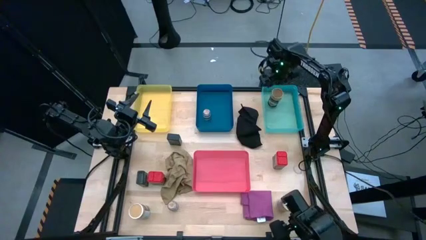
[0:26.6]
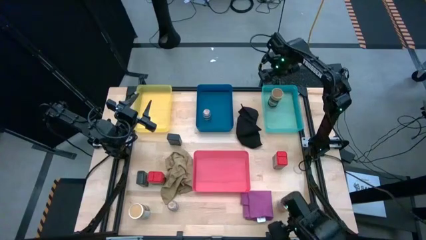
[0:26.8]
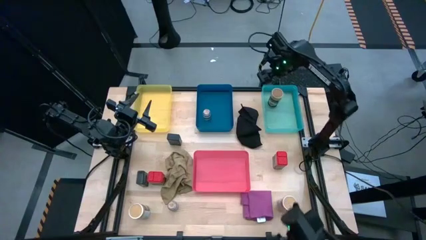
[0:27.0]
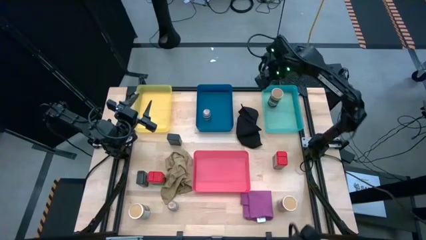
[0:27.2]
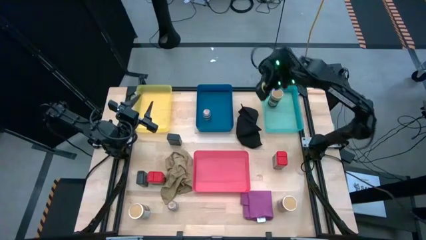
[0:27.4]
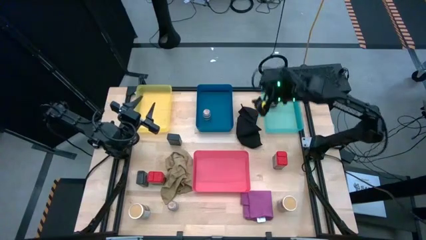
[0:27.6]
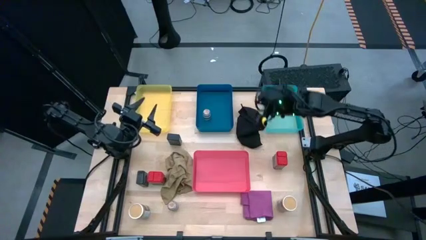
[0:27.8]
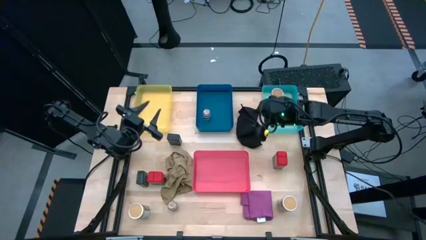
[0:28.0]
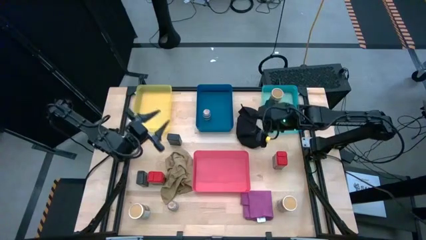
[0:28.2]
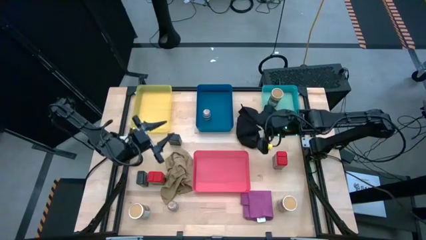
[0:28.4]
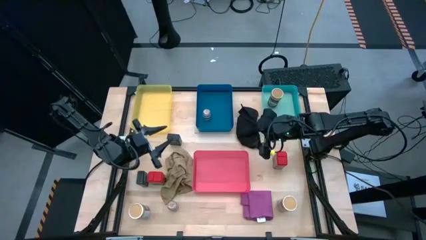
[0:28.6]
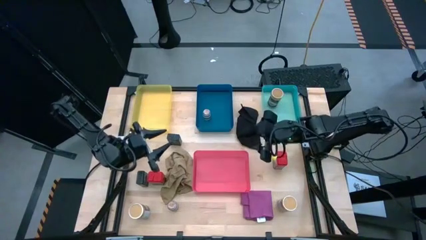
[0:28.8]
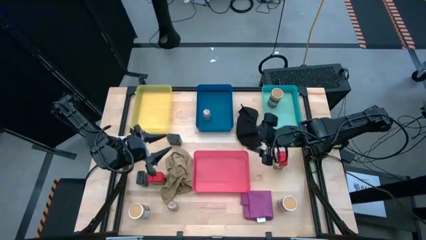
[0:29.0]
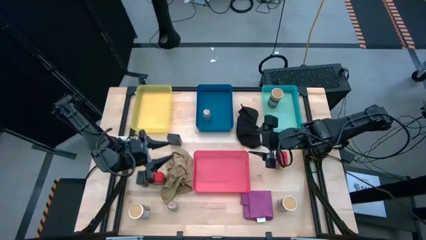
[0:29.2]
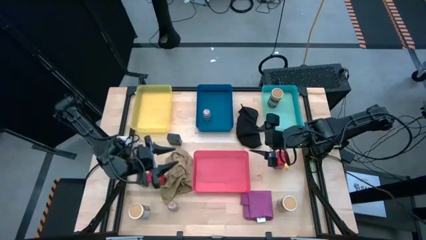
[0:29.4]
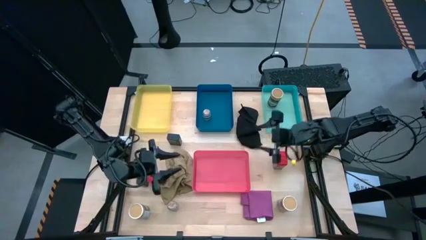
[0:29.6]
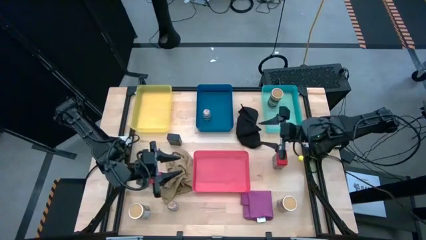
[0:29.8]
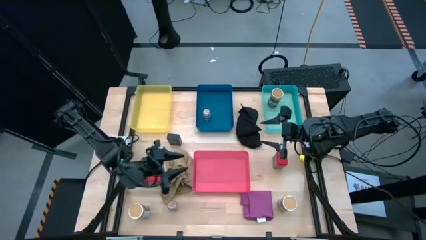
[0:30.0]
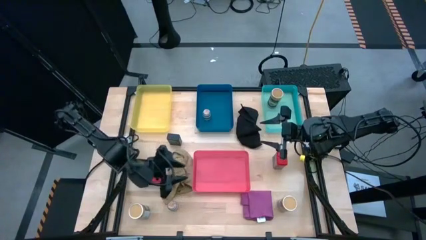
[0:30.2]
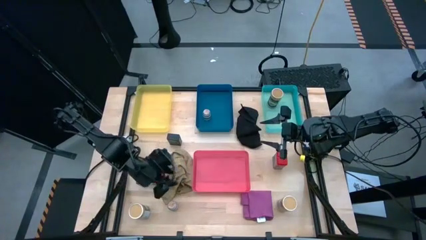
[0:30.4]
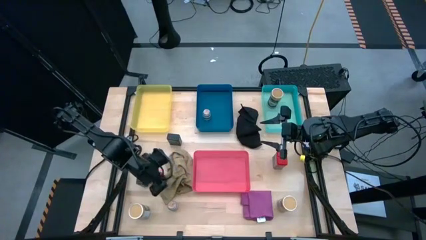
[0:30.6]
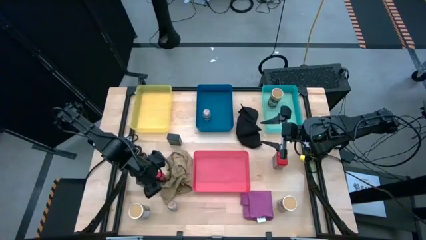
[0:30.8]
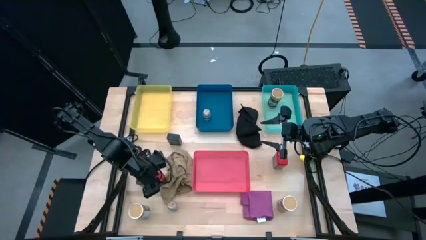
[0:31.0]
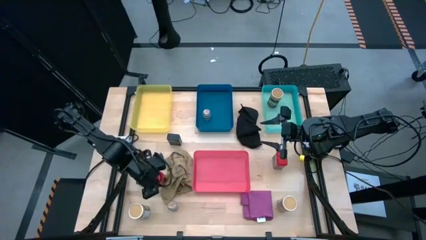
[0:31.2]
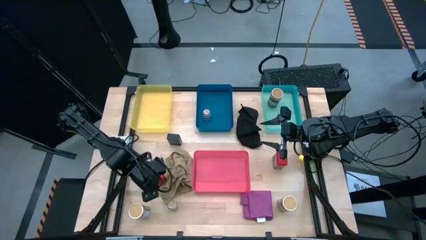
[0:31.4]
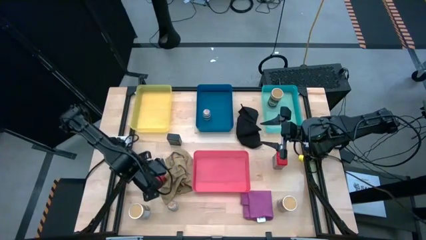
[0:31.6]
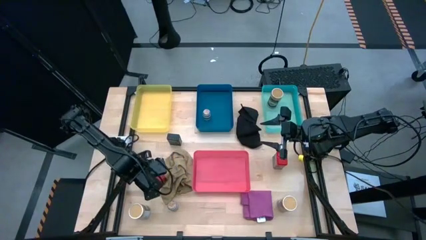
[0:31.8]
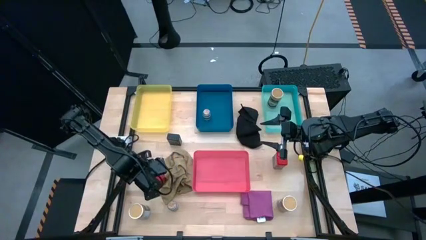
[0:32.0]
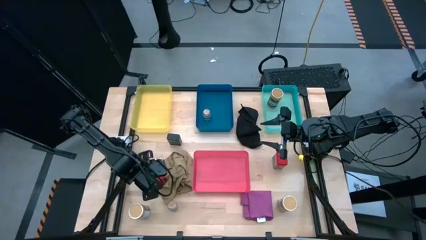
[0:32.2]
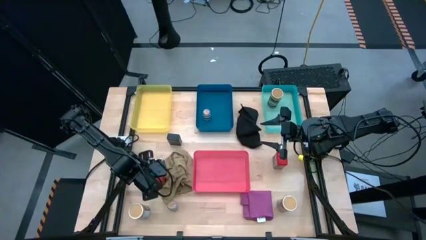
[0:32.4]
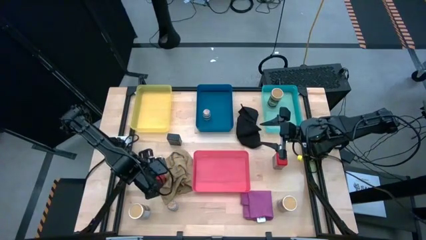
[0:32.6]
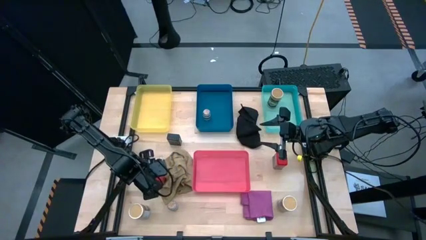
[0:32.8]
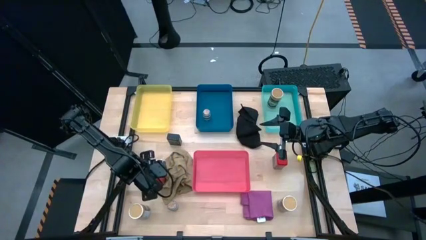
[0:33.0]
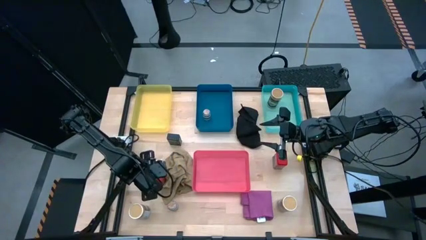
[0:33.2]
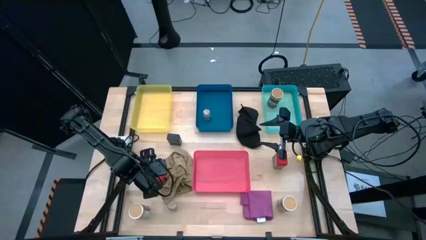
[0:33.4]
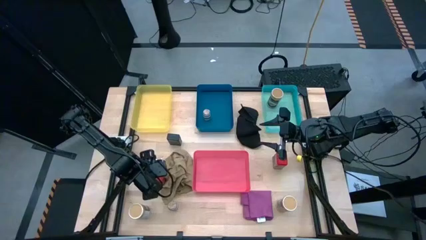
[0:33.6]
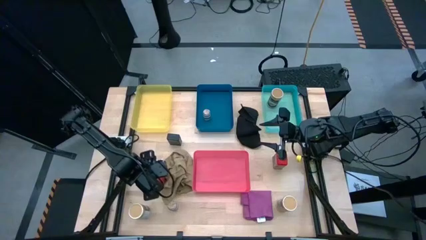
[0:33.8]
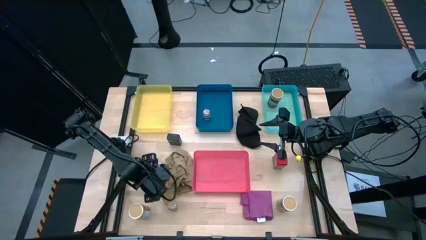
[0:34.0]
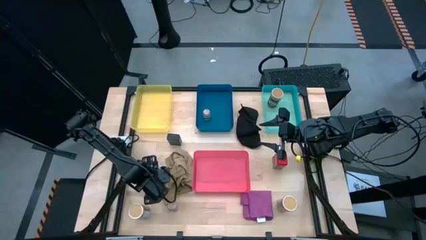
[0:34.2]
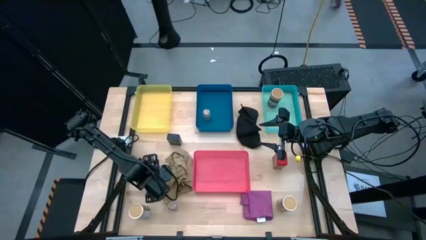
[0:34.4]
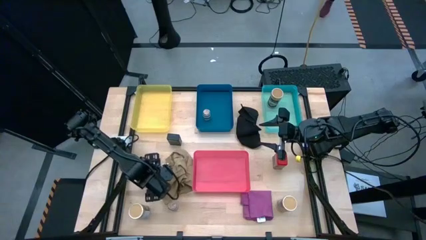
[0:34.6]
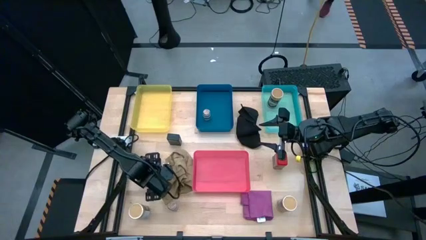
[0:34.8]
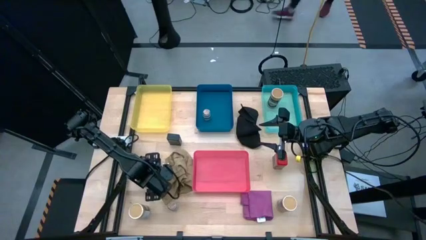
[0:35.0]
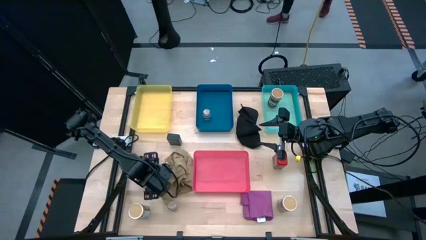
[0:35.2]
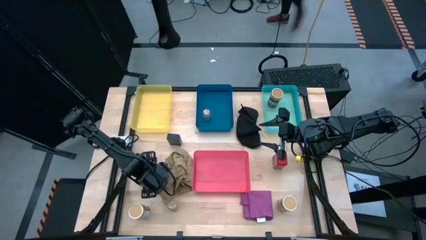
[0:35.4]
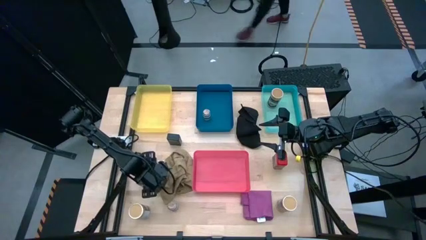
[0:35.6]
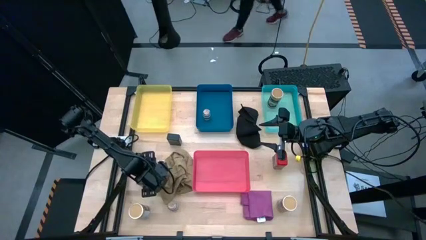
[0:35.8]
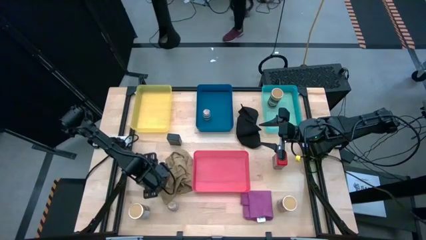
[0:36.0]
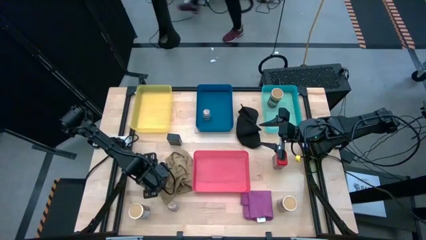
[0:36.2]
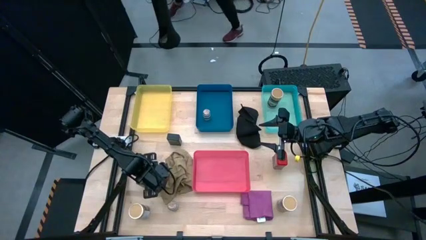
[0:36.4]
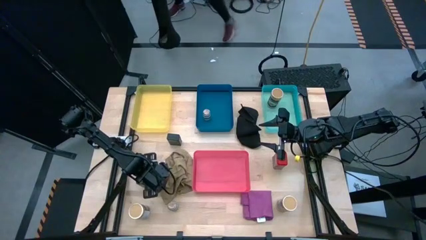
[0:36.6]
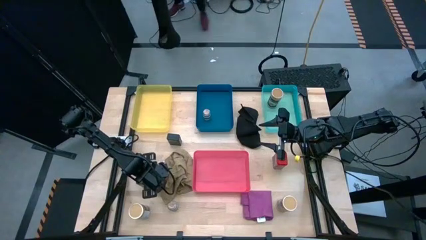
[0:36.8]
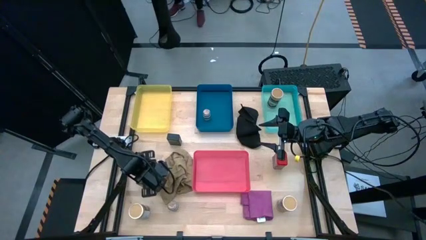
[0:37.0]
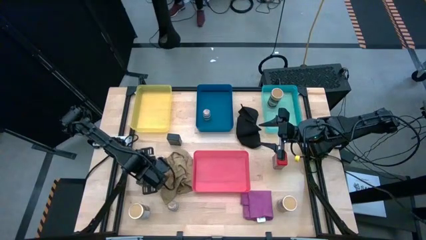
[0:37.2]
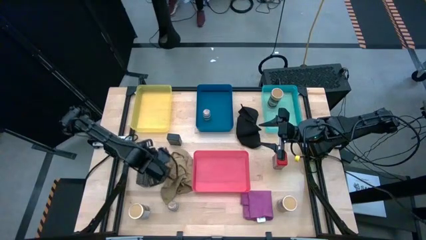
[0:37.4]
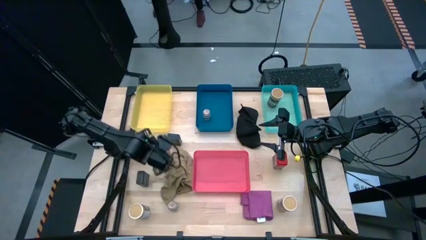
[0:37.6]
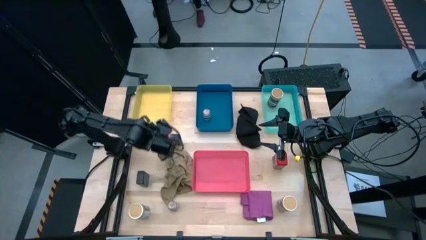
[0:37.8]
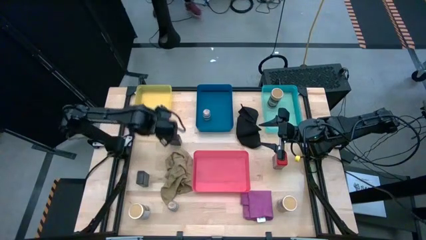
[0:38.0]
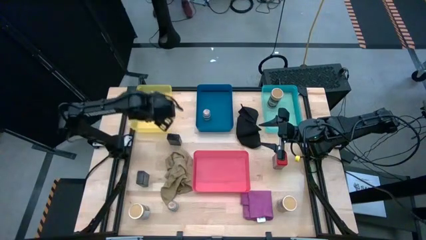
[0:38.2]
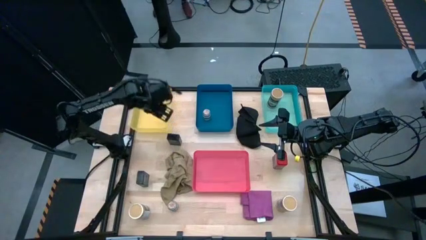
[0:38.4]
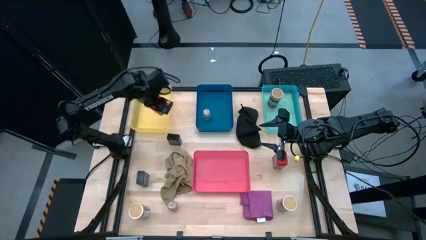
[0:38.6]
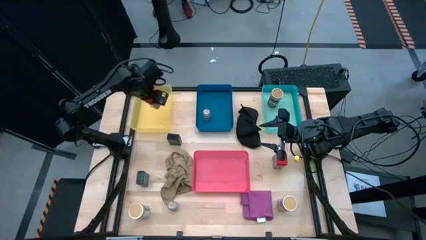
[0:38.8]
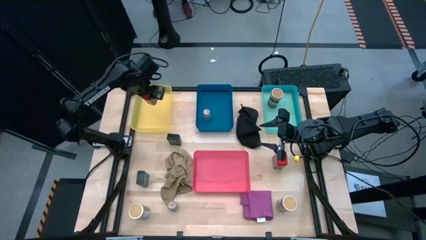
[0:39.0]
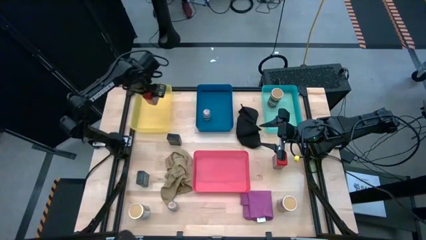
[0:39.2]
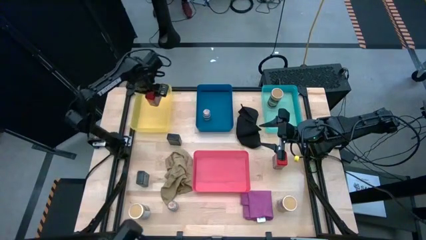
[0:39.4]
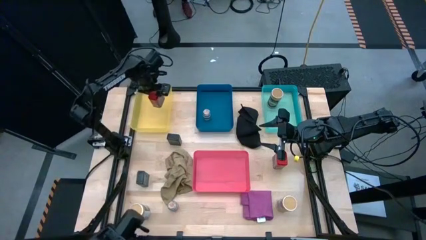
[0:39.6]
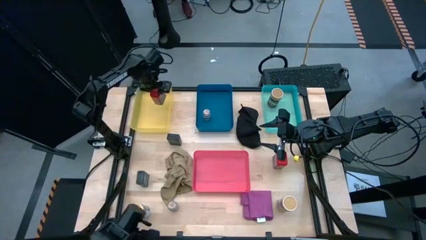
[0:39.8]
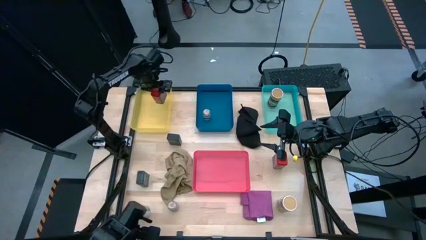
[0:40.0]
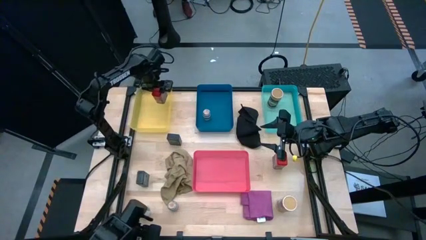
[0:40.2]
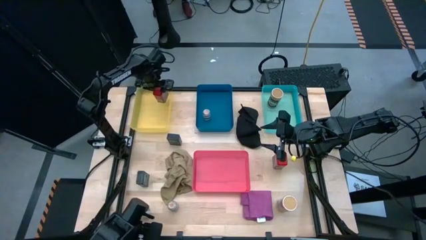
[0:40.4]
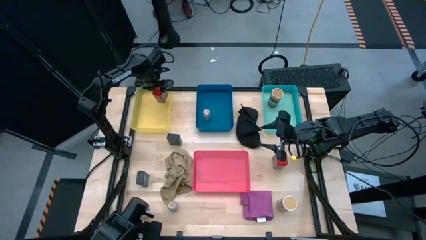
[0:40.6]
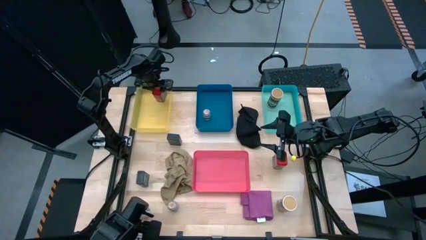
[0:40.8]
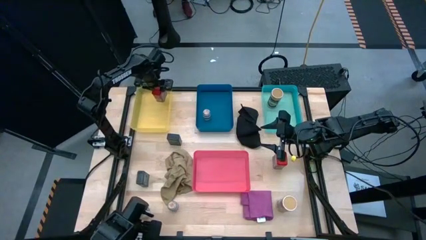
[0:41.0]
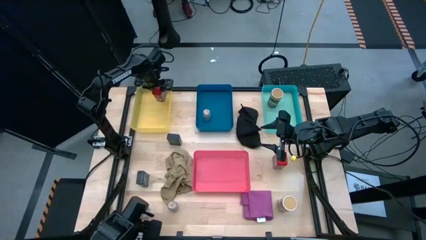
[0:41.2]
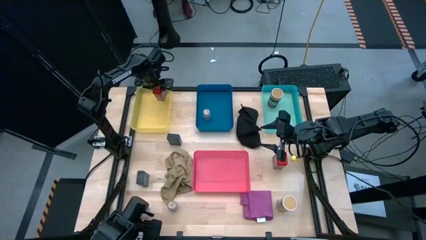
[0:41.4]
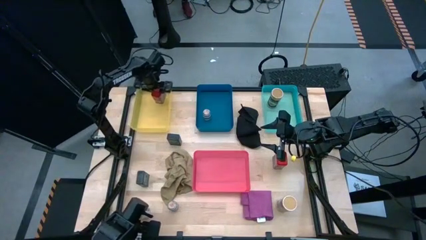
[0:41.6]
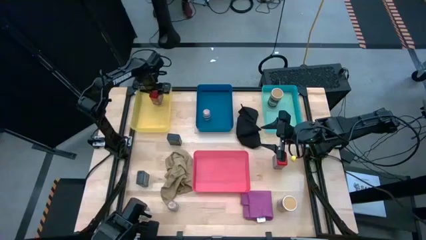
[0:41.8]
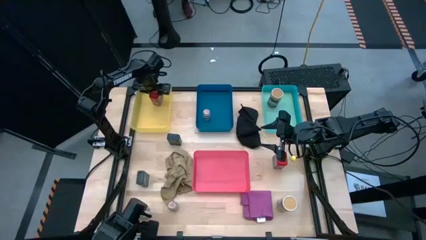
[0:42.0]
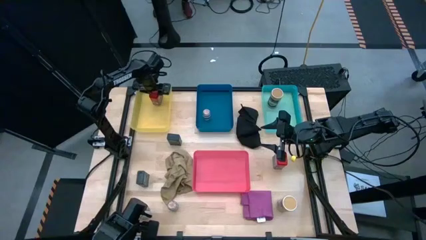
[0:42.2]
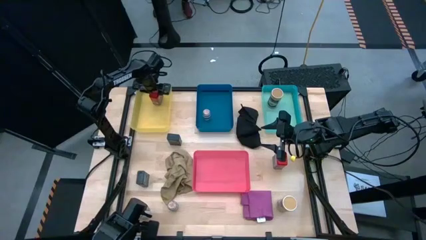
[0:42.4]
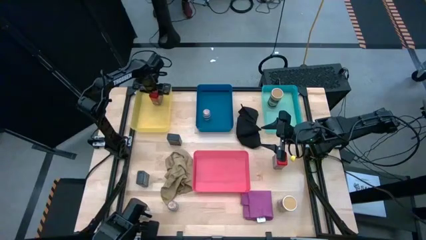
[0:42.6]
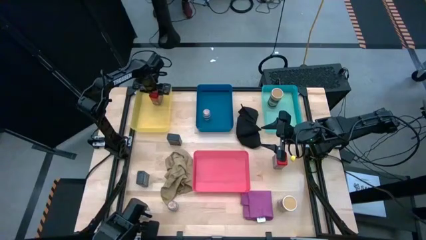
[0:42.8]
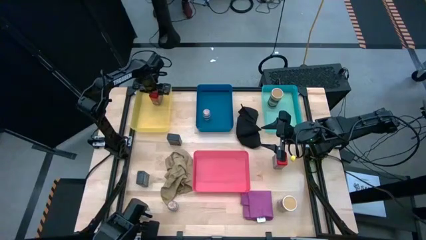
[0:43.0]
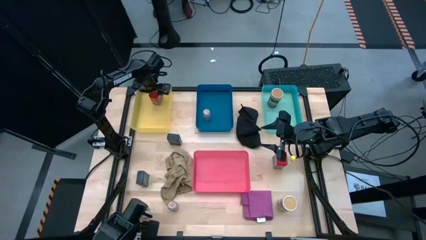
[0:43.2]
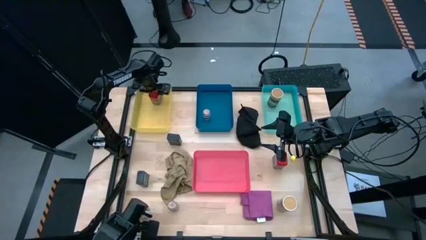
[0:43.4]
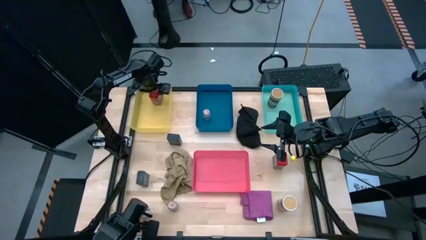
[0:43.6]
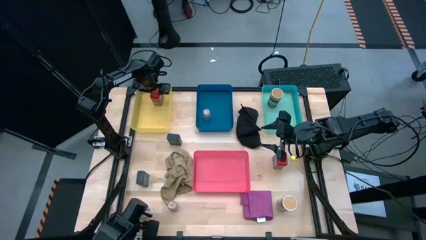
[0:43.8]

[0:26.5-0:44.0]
Task: Sort spices by type
Put the left red seasoning can into the yellow bin
